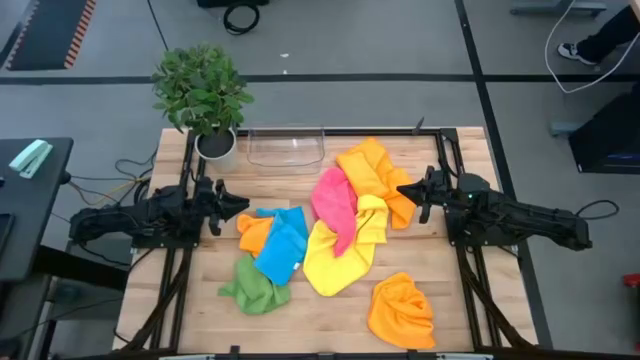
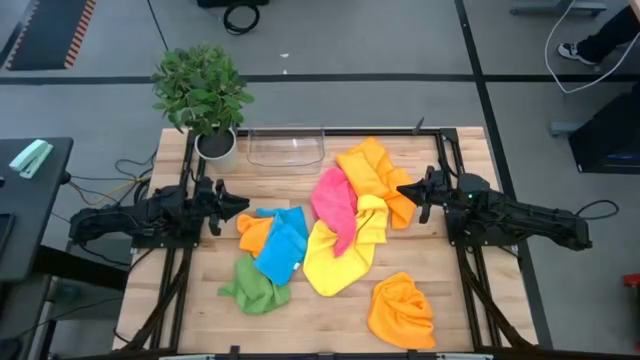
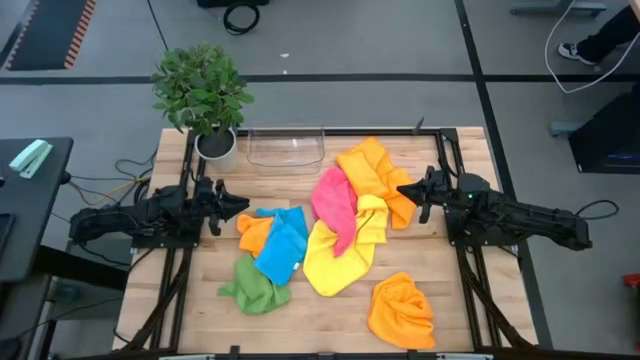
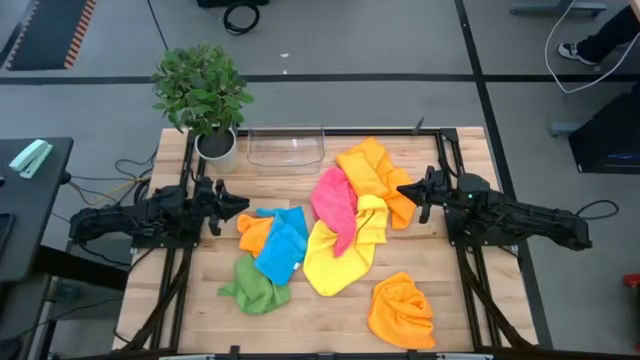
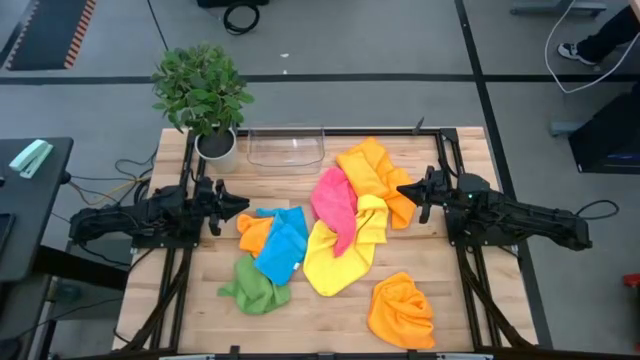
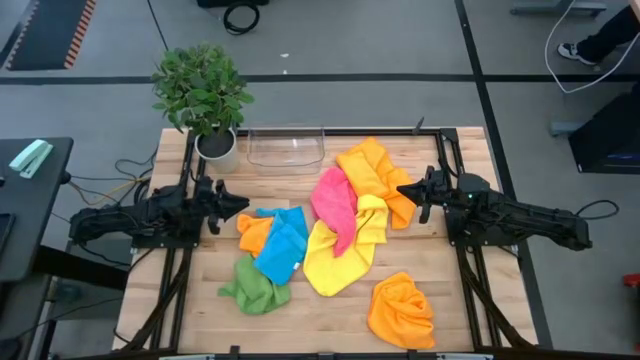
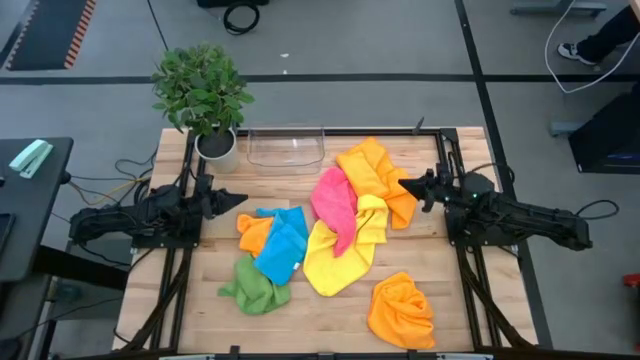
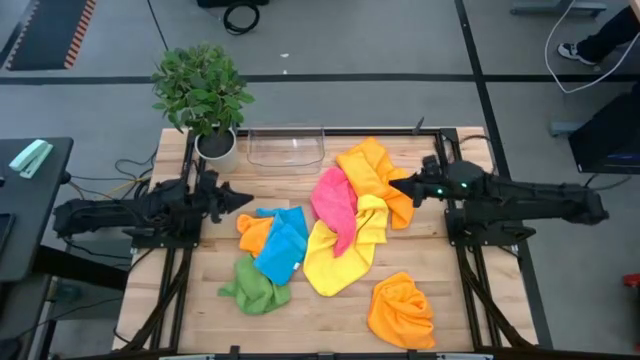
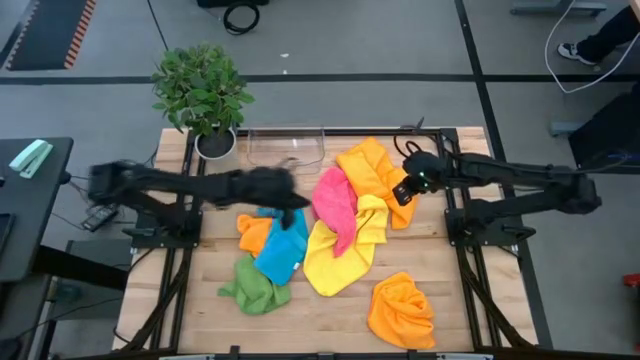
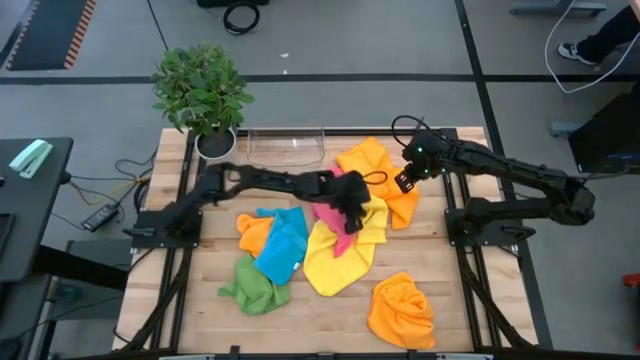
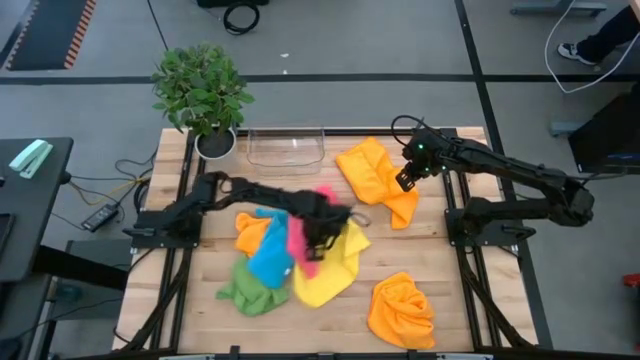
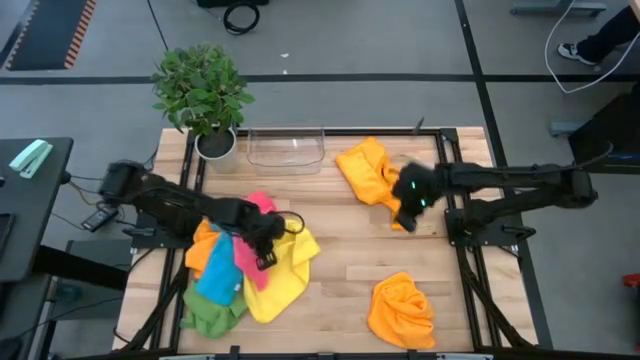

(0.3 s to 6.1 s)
Task: Fold microfiber towels
Adjust the microfiber cloths

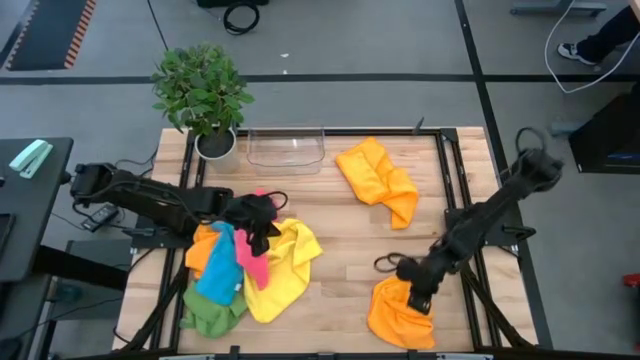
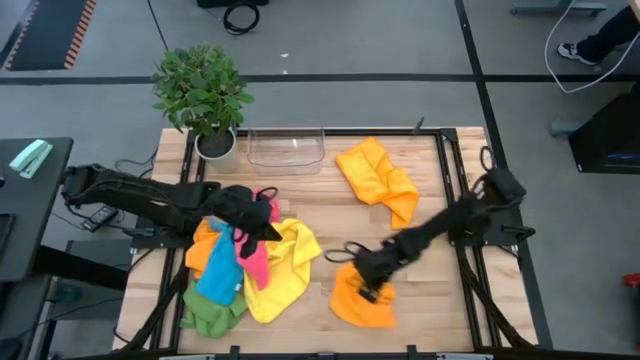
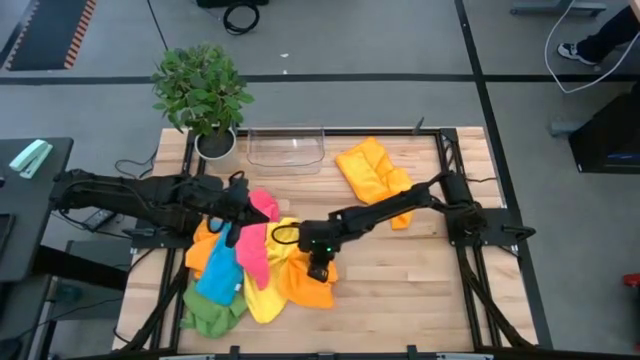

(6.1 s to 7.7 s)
Adjust the bottom right orange microfiber cloth

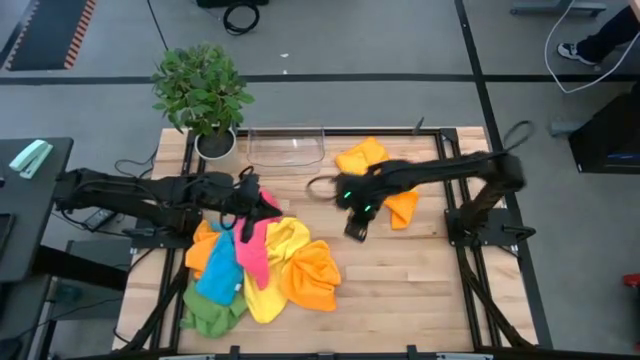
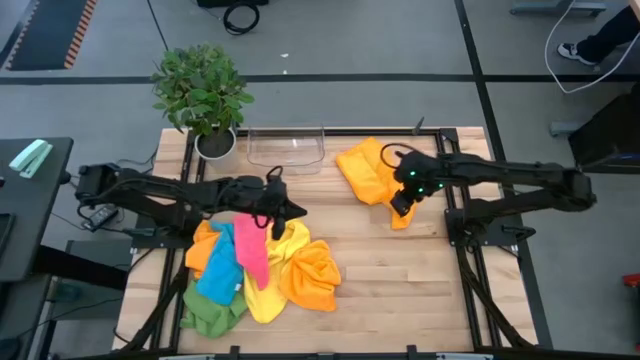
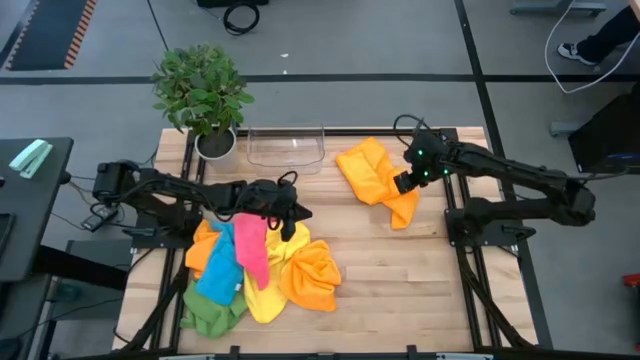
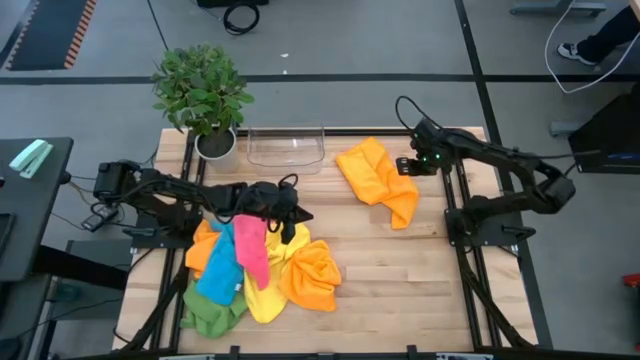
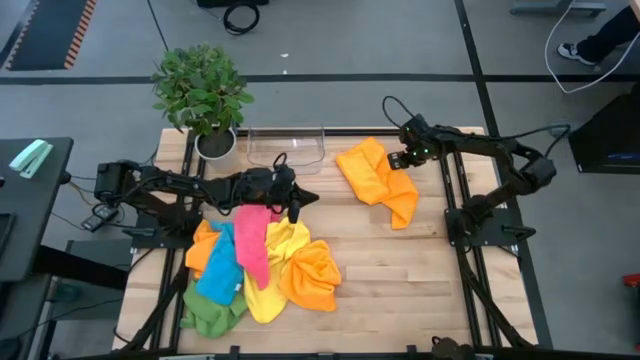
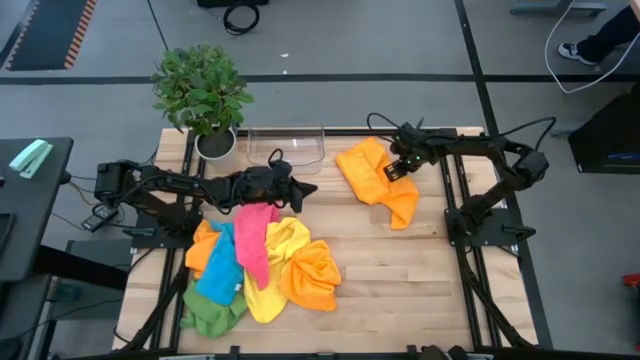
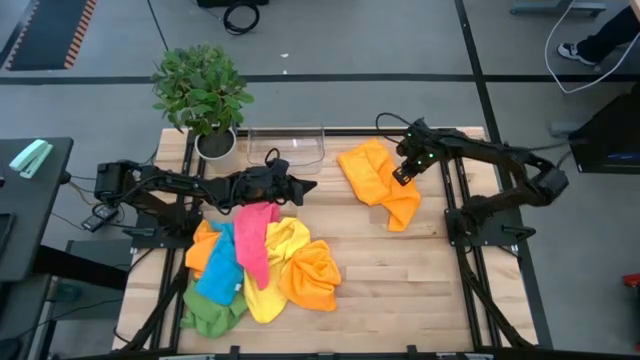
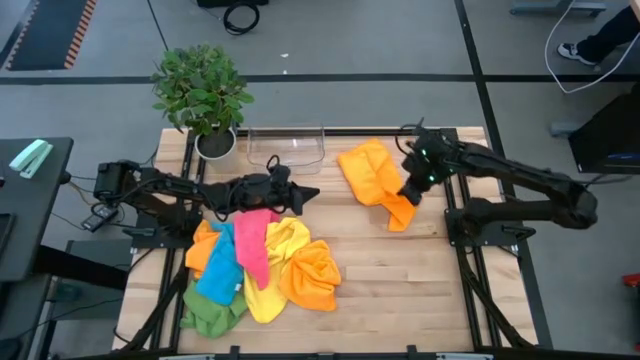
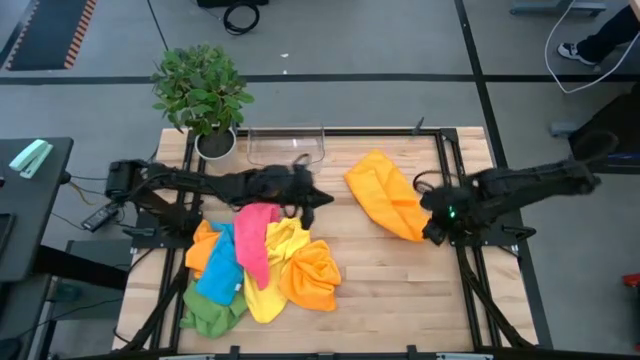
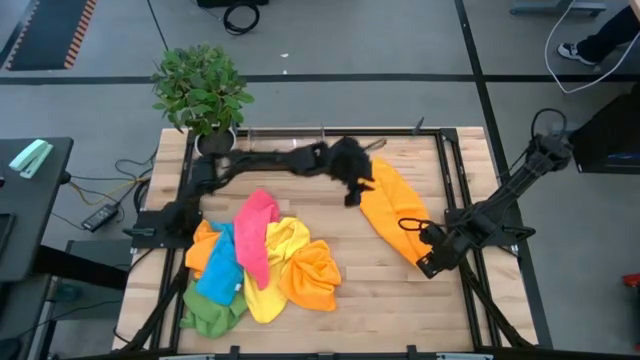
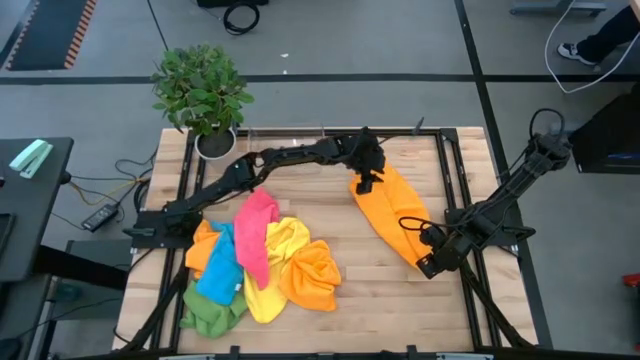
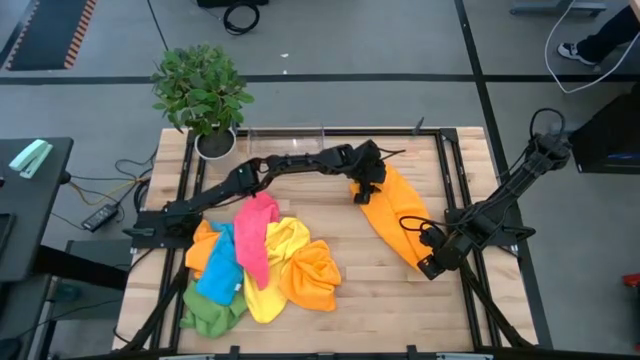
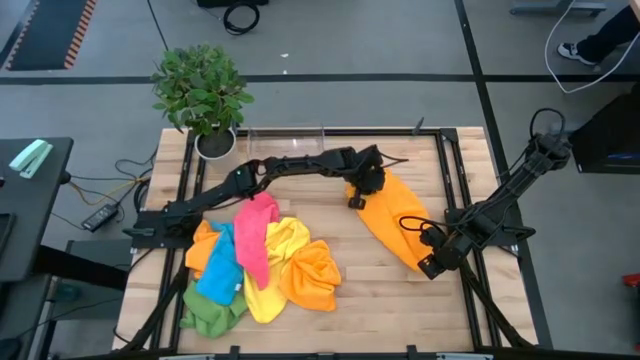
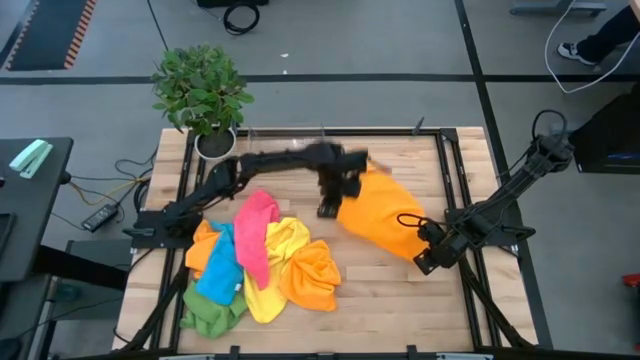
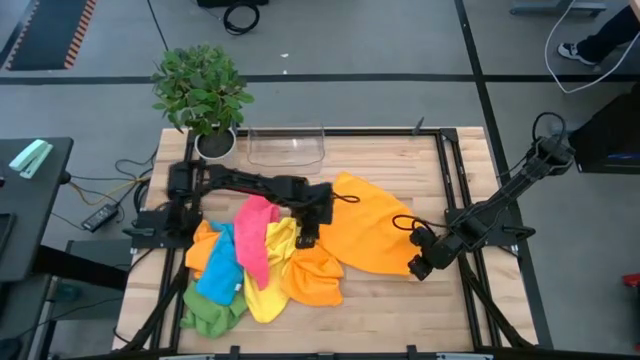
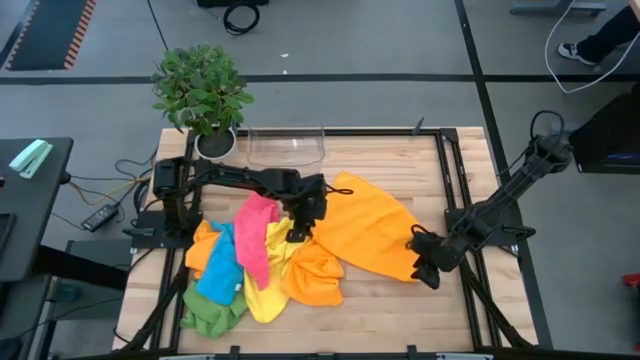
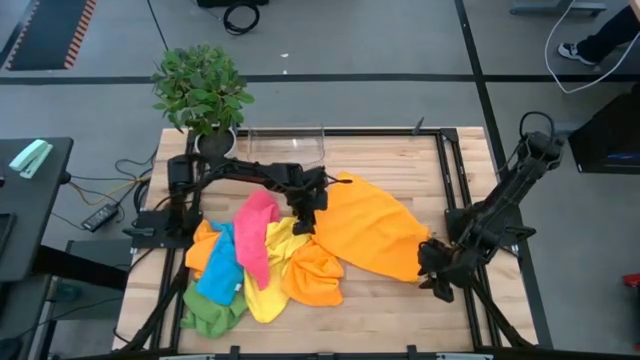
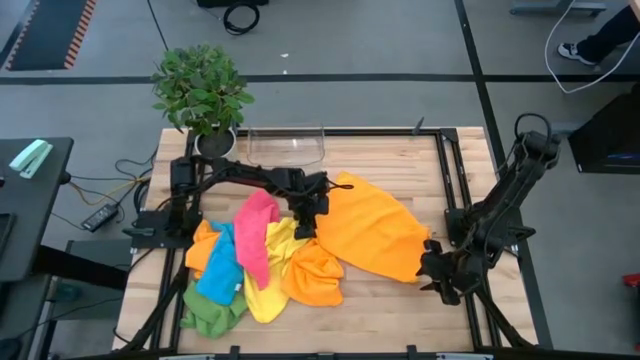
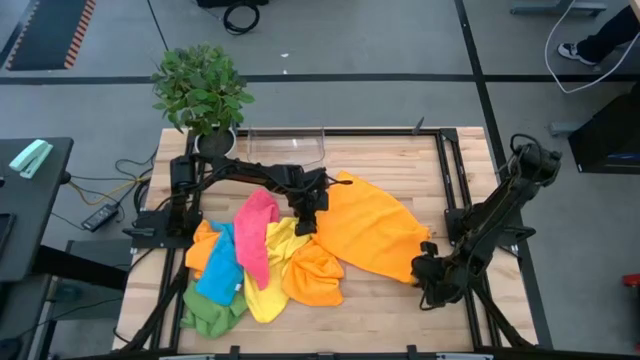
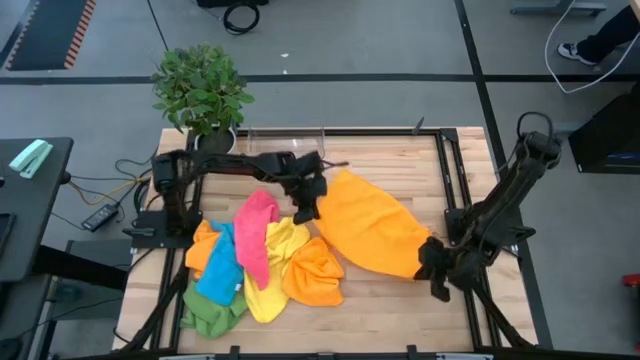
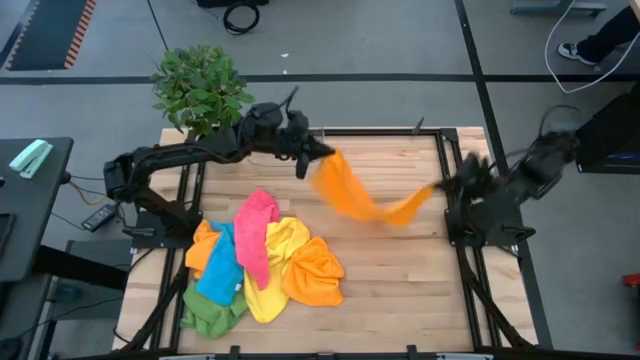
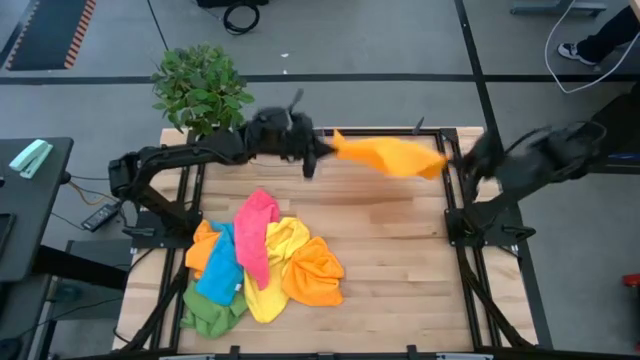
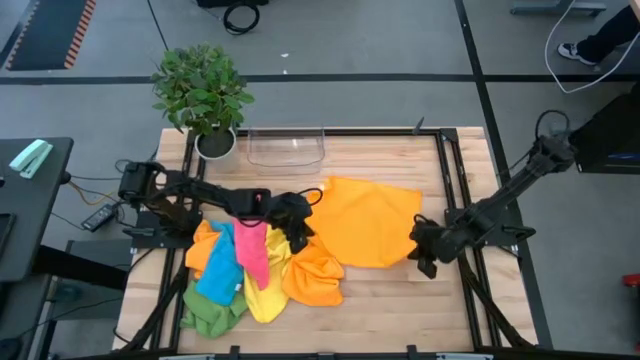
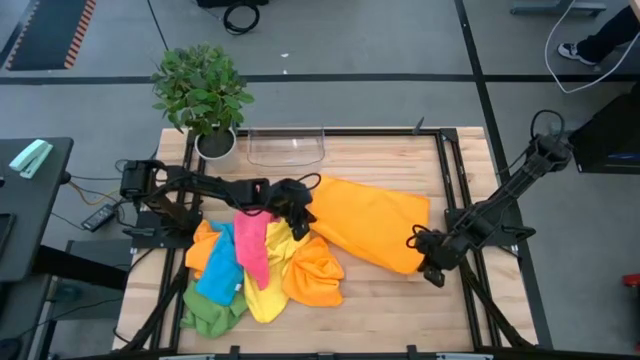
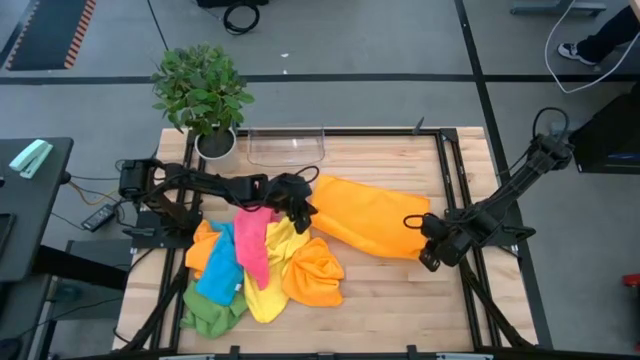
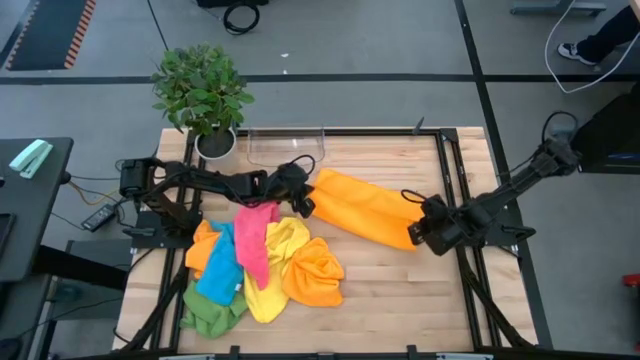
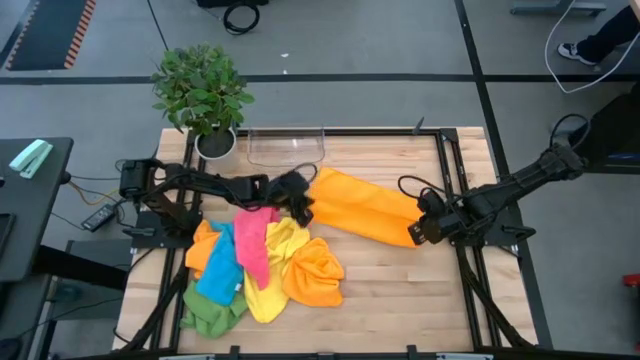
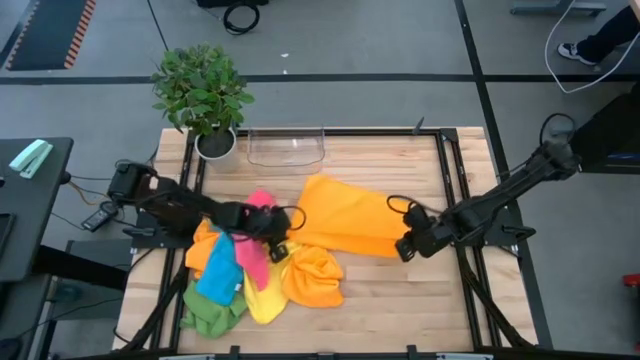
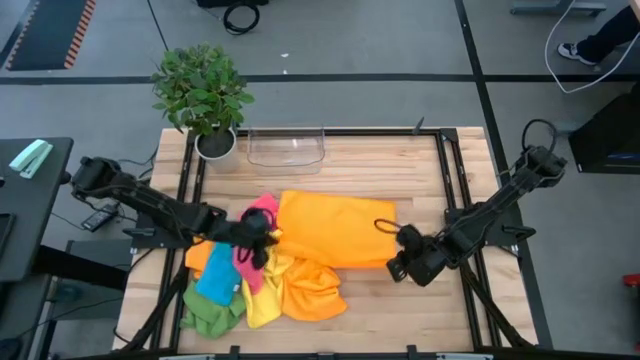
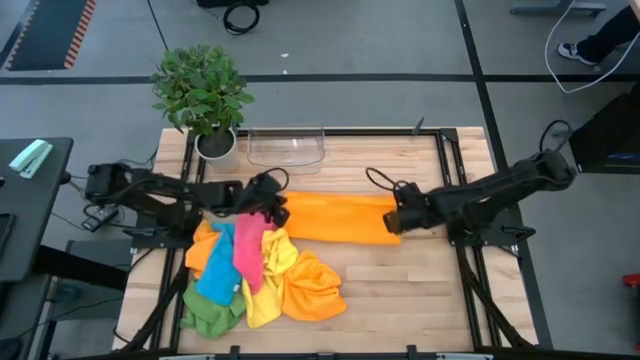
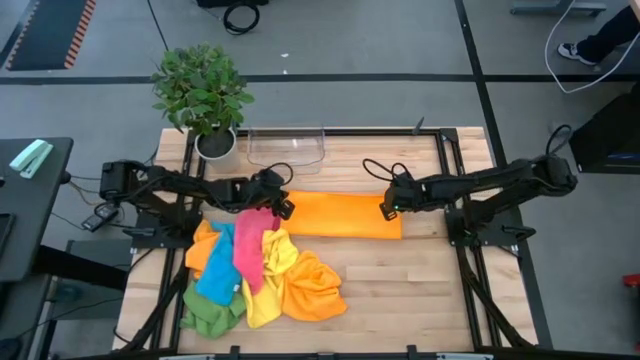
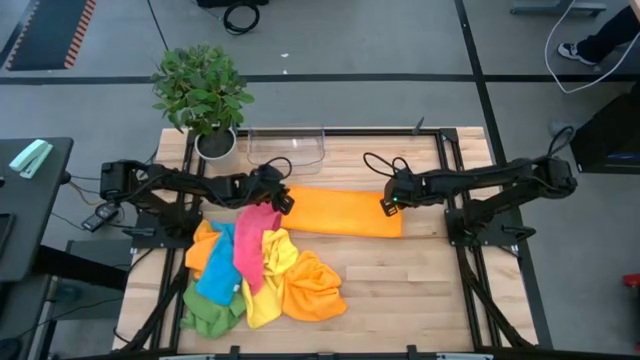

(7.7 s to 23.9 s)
Fold the top right orange microfiber cloth
